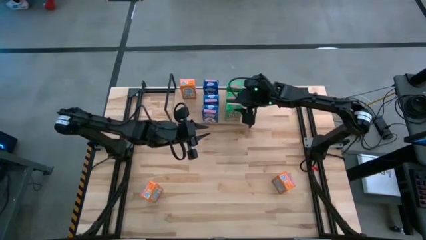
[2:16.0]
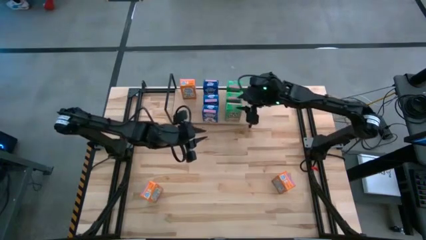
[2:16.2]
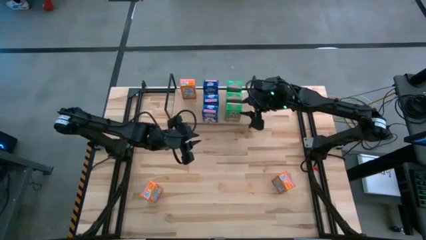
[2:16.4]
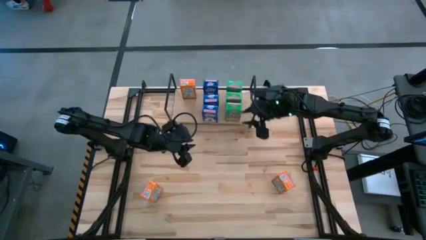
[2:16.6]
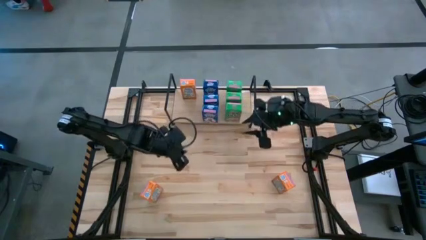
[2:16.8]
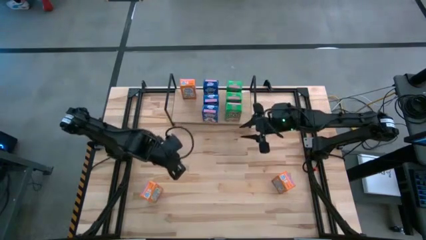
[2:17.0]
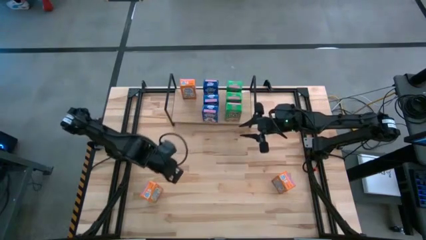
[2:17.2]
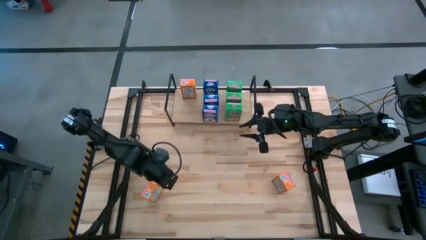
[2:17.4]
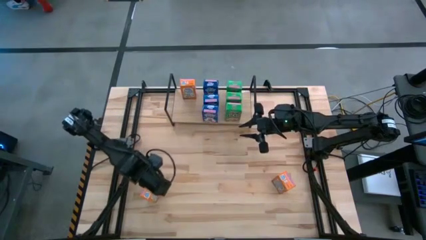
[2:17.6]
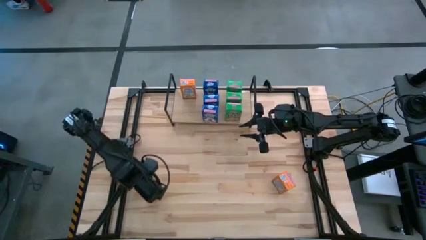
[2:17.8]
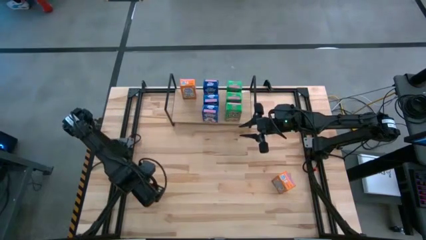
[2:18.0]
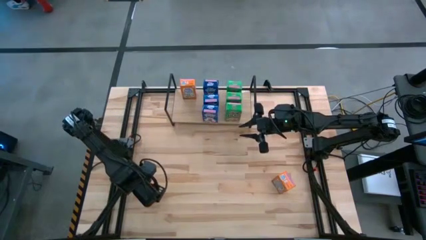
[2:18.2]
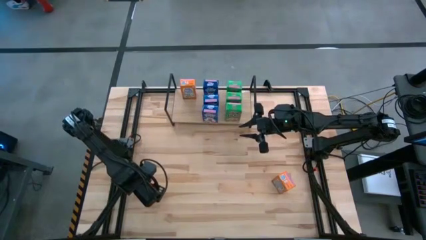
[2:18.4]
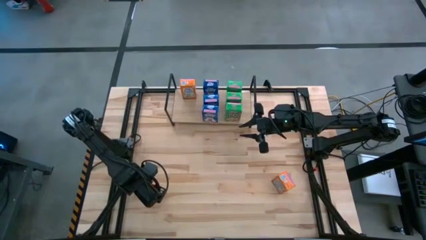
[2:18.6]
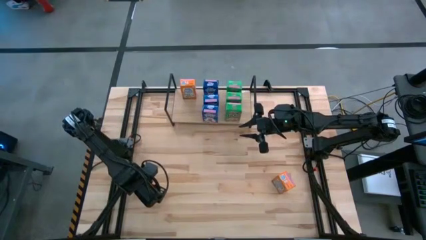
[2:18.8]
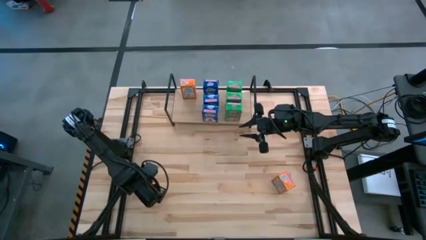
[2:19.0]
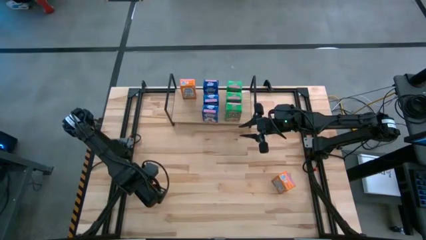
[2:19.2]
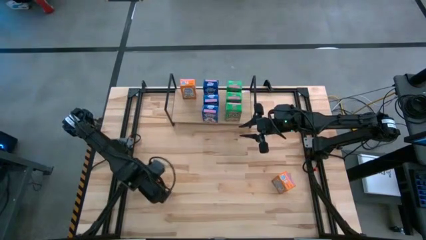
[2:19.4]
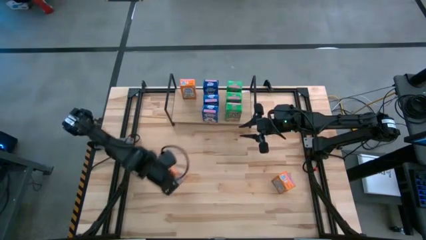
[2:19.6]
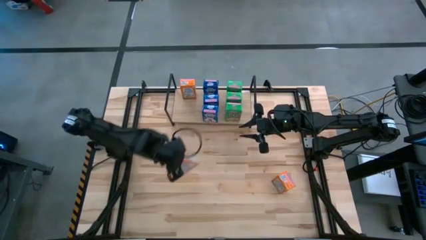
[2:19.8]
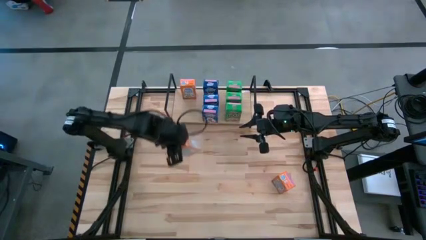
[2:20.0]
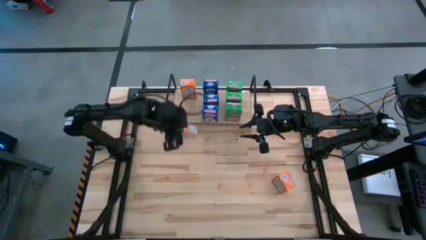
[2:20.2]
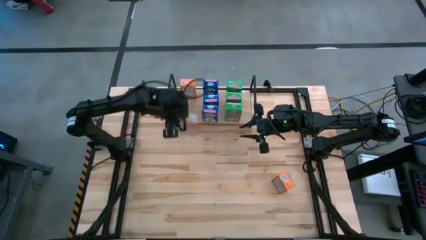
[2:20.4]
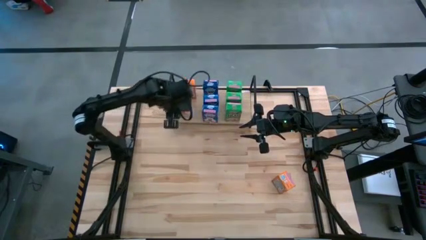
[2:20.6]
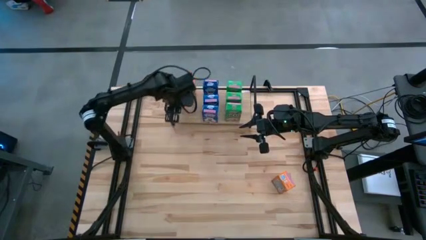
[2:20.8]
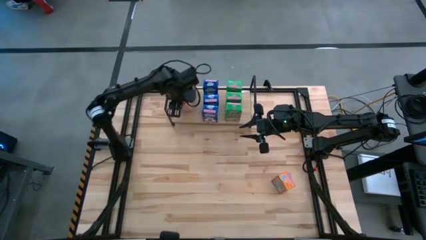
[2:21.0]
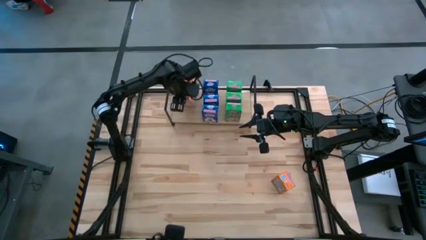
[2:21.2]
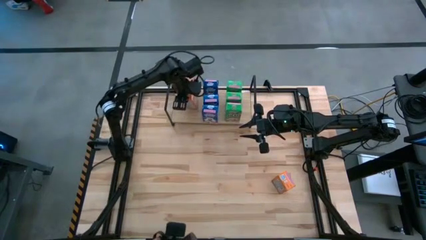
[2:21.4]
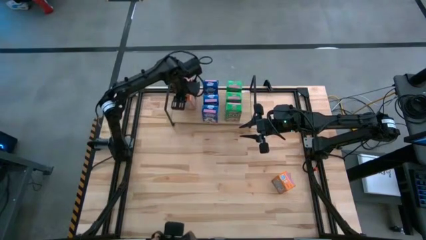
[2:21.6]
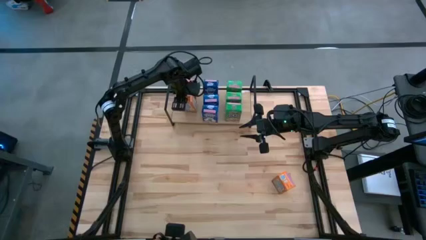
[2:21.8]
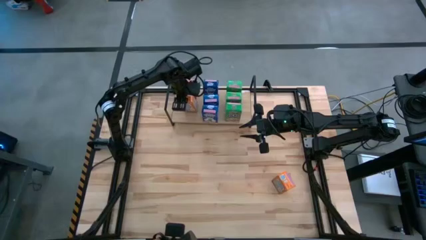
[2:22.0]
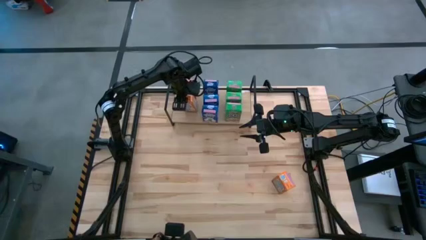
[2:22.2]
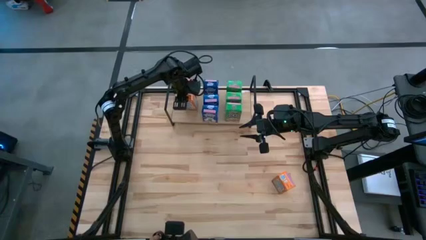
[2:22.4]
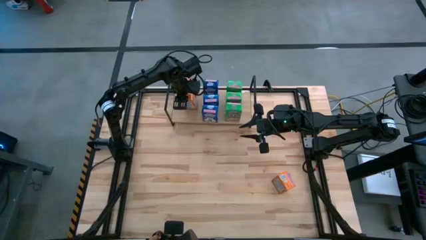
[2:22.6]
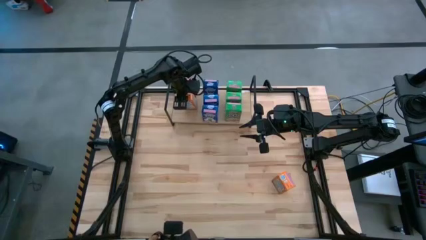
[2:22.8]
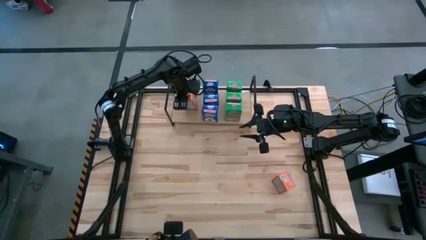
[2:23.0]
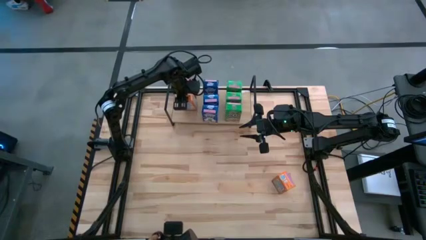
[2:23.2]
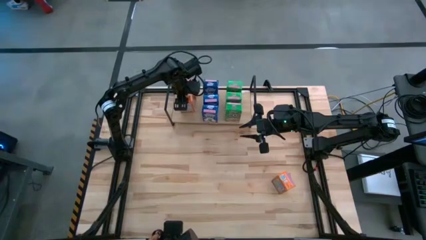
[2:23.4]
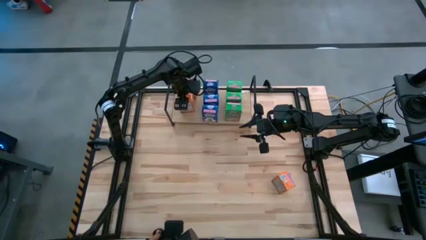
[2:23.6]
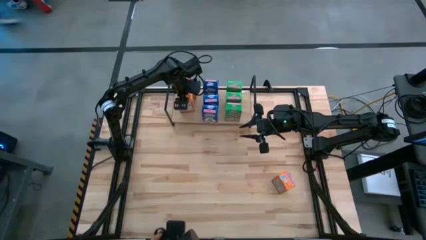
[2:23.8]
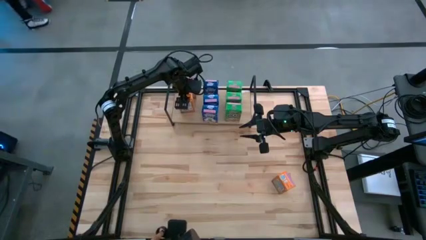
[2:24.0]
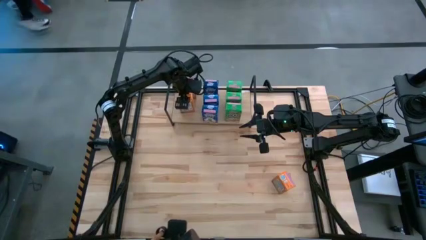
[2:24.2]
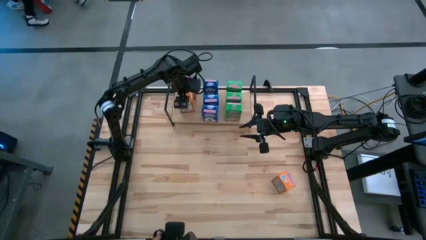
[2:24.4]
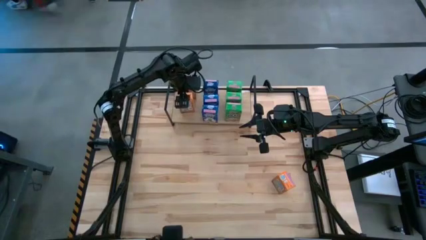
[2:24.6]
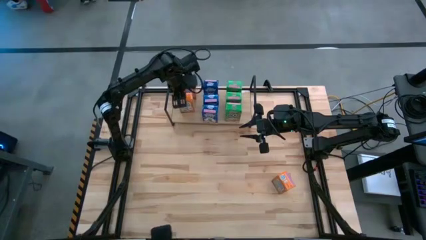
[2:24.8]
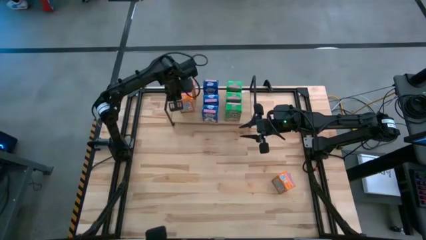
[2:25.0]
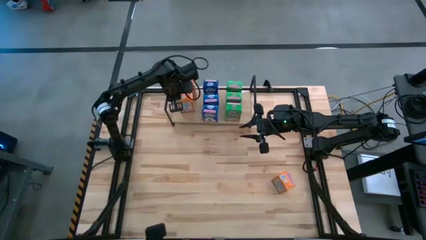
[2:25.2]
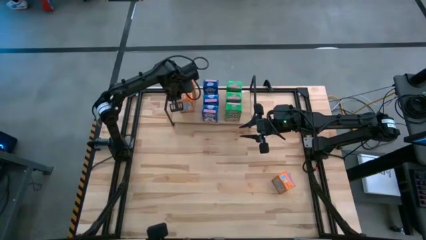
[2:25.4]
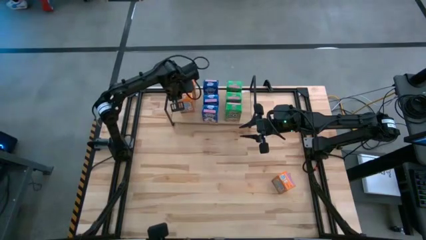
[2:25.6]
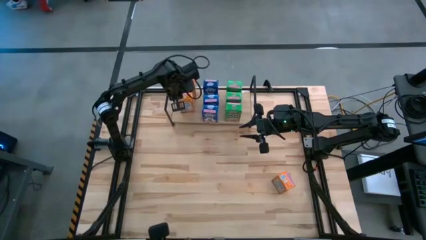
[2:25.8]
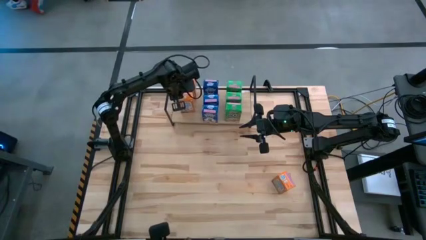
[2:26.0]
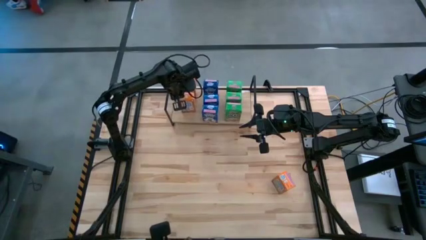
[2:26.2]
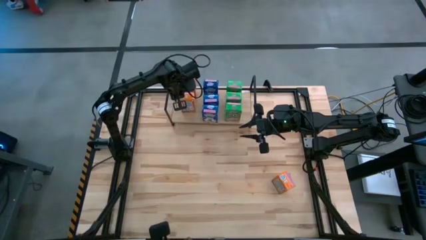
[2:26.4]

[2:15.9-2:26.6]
Task: Stack cereal on shelf
Put the left orange cereal box on the shelf

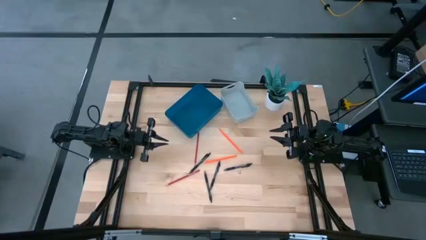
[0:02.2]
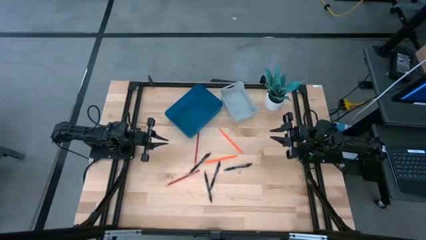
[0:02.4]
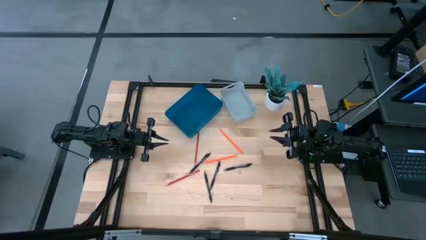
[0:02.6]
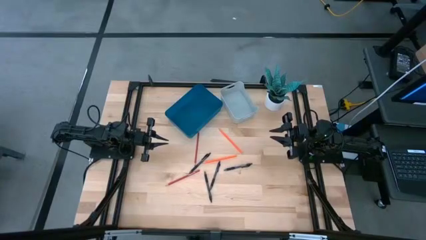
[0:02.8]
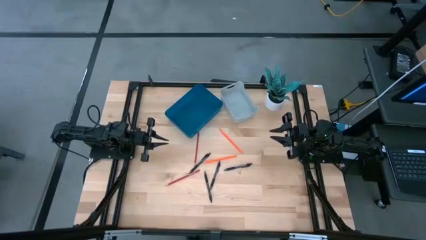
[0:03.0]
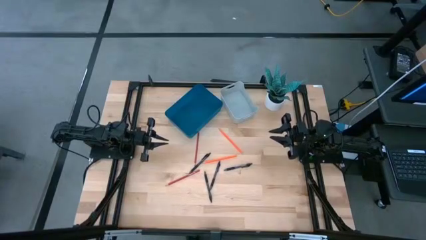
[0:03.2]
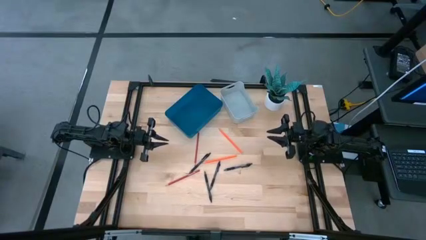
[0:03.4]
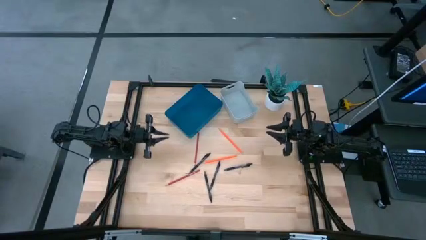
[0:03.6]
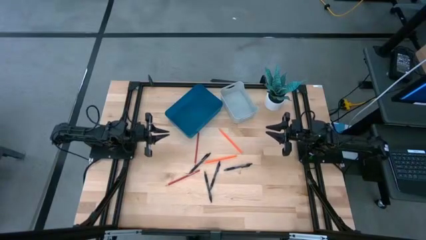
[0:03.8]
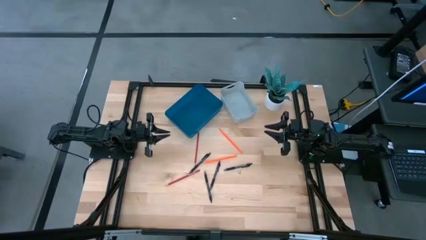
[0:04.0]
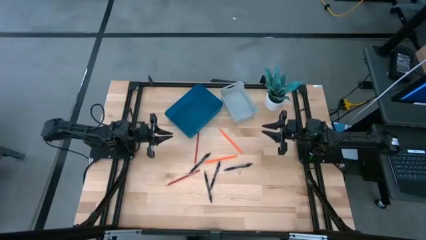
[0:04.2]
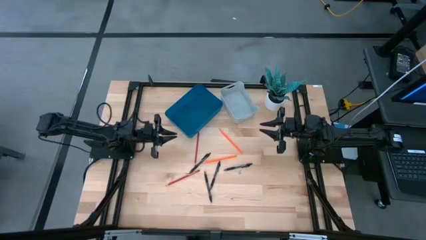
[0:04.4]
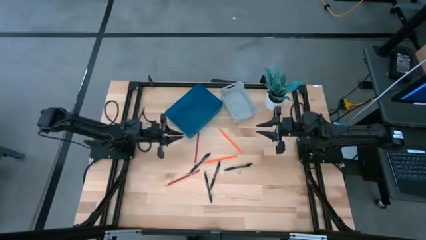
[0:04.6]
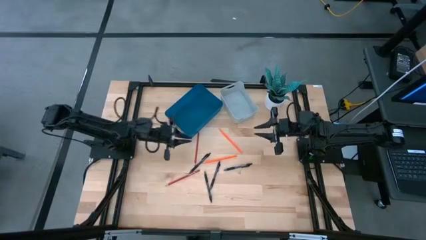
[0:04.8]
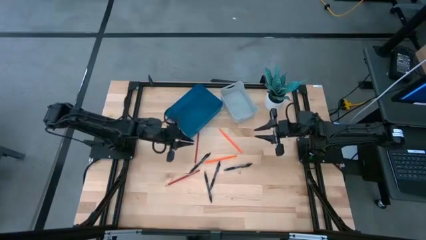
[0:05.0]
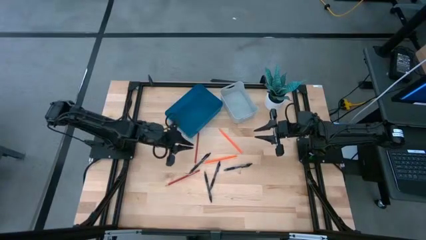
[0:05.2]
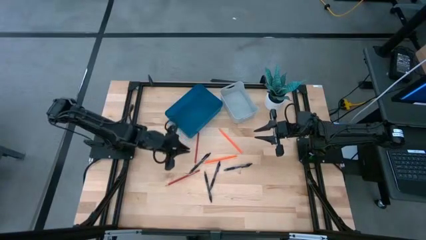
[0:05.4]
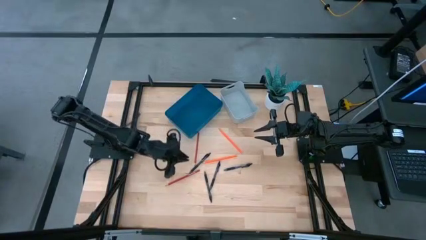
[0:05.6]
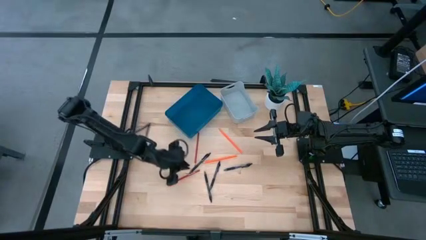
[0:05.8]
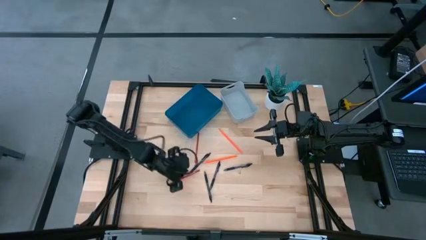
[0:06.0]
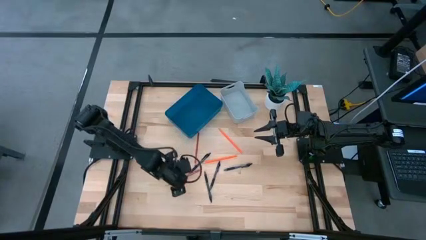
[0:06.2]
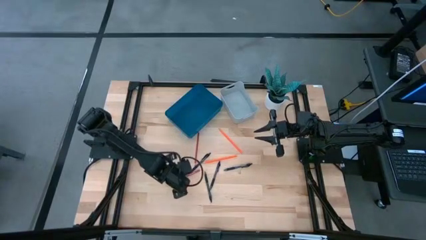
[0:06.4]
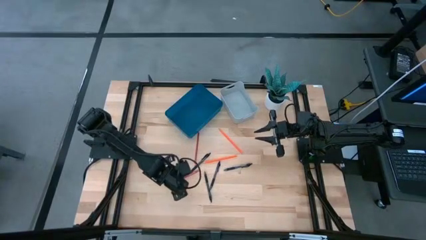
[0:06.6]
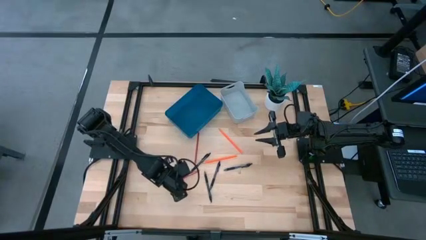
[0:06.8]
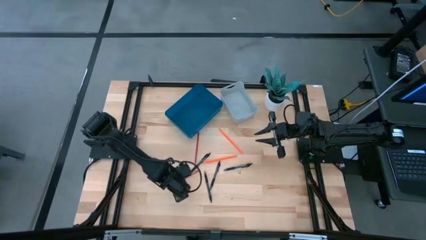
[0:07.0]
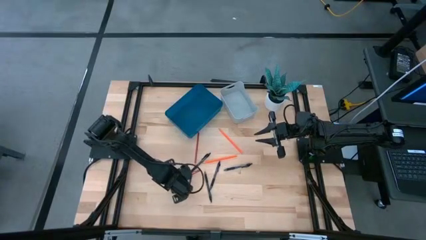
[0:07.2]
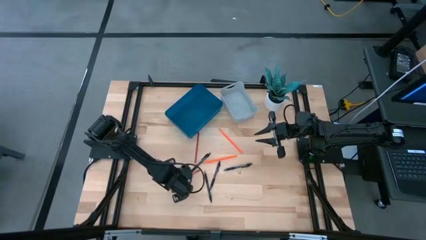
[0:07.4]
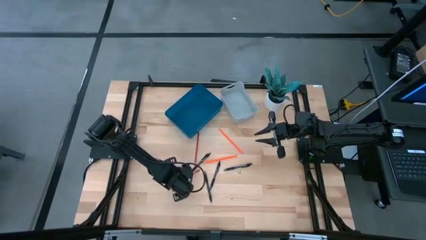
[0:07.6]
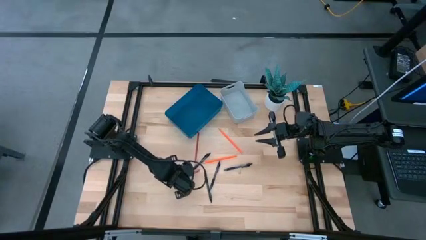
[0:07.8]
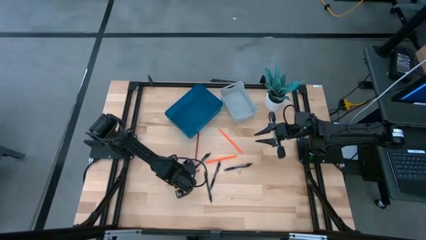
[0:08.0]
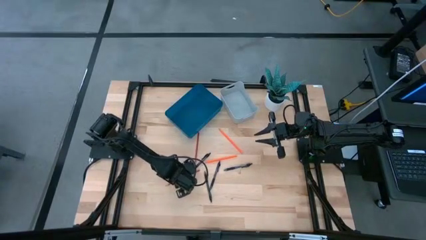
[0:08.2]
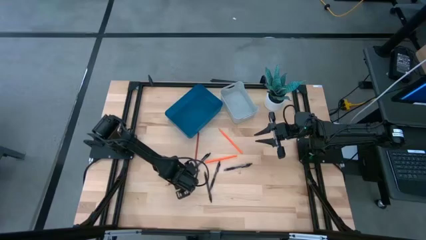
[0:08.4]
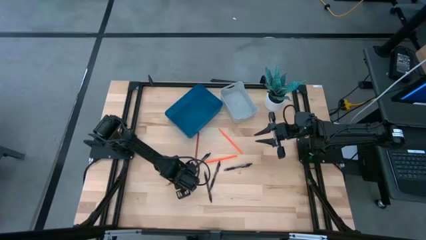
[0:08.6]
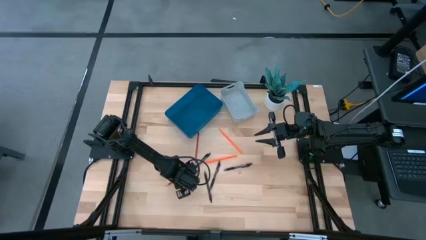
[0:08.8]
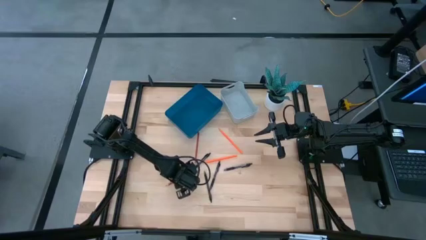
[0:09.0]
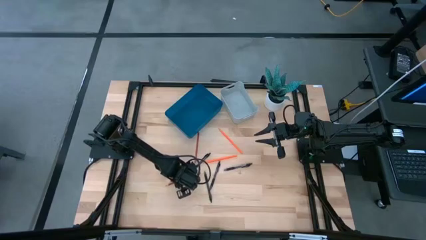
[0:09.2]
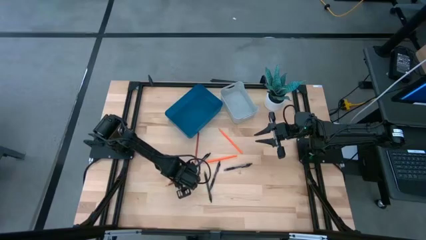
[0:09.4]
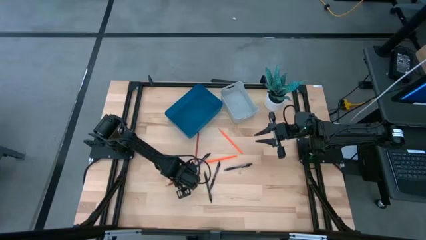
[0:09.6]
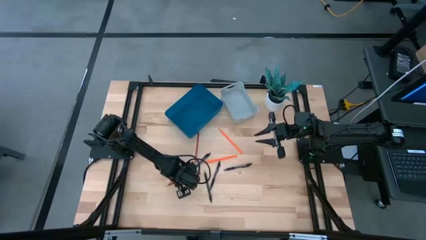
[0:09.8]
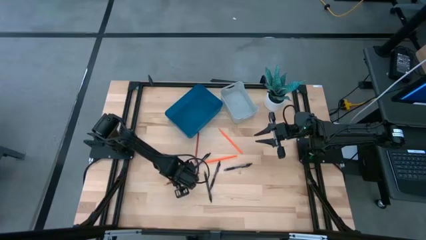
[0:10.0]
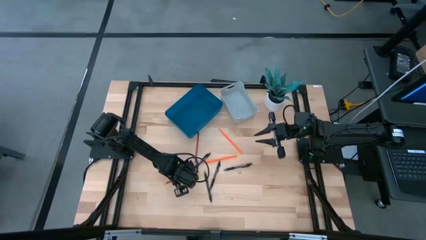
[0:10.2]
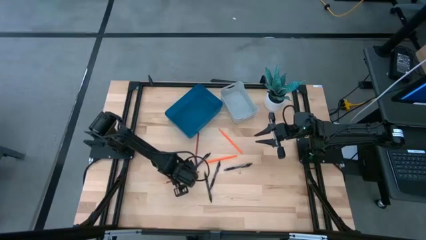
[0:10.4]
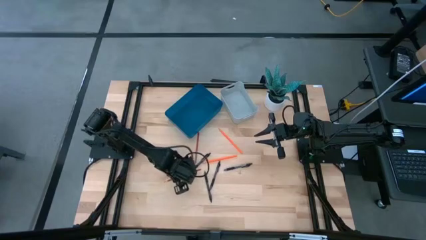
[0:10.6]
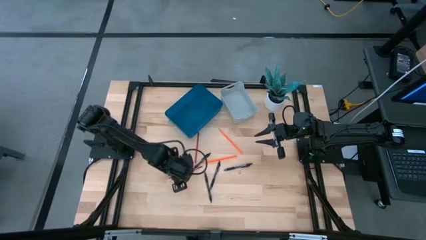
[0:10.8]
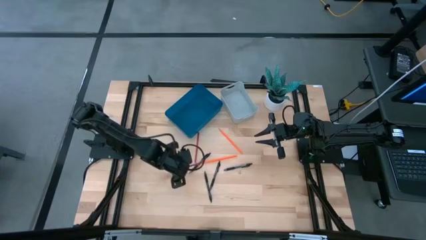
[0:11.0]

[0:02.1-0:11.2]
Task: Sort pens & pencils
Put the red pencil into the blue bin
